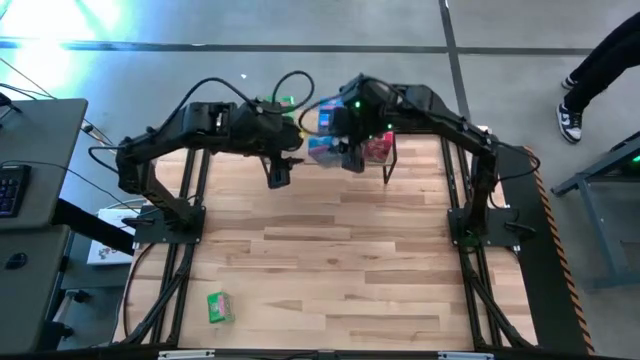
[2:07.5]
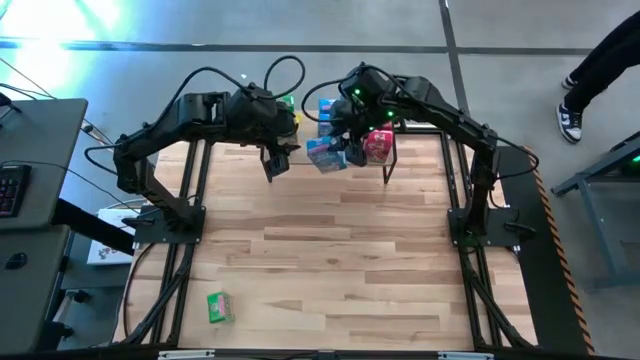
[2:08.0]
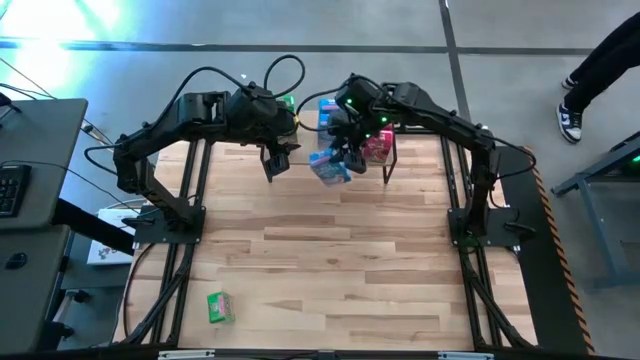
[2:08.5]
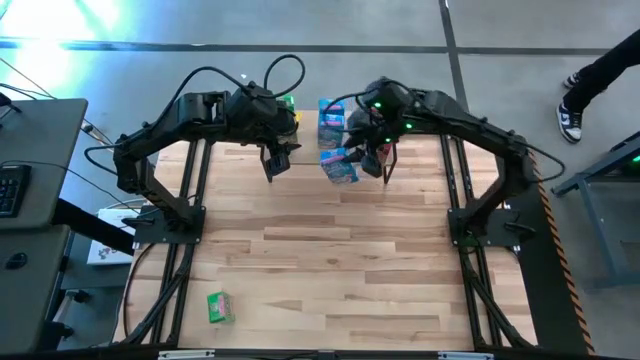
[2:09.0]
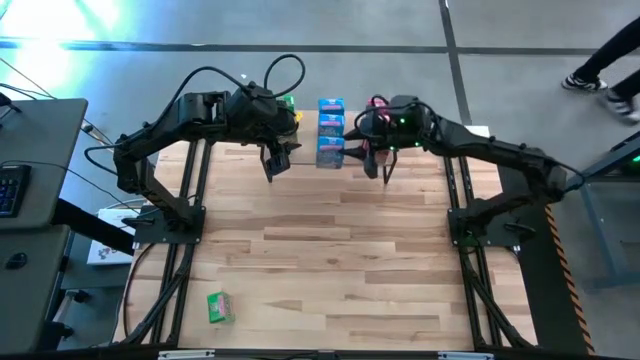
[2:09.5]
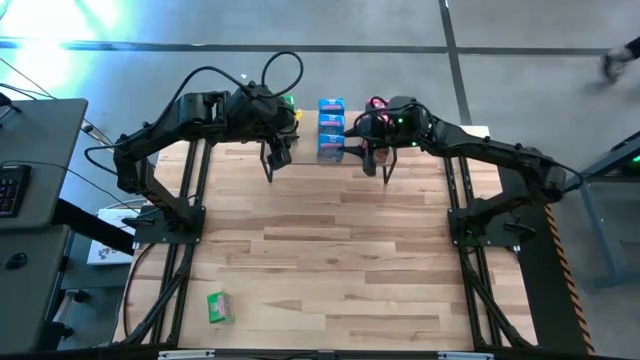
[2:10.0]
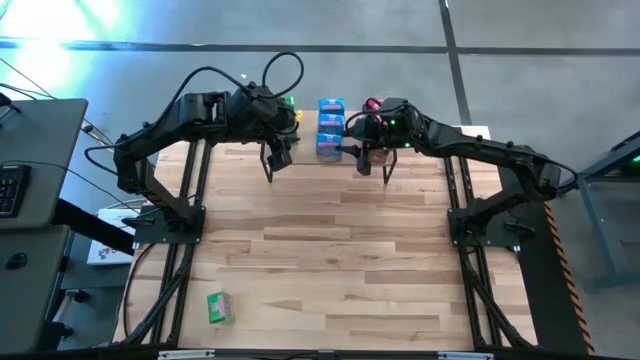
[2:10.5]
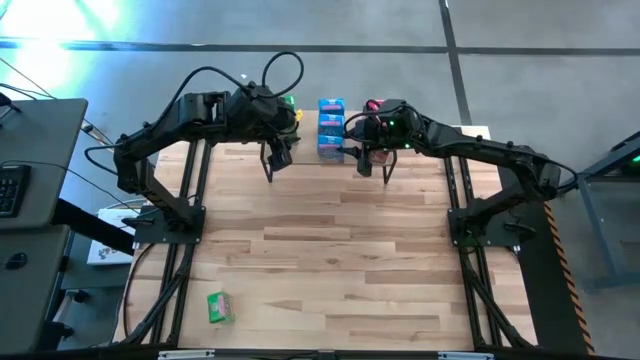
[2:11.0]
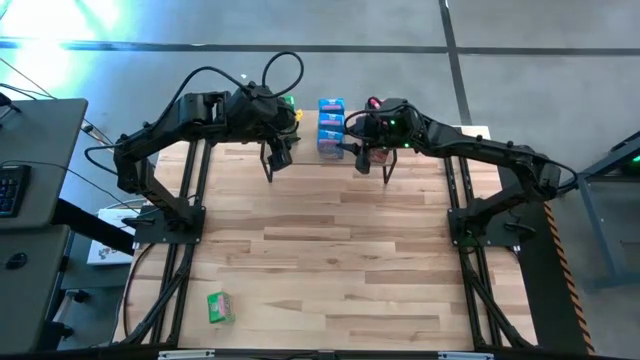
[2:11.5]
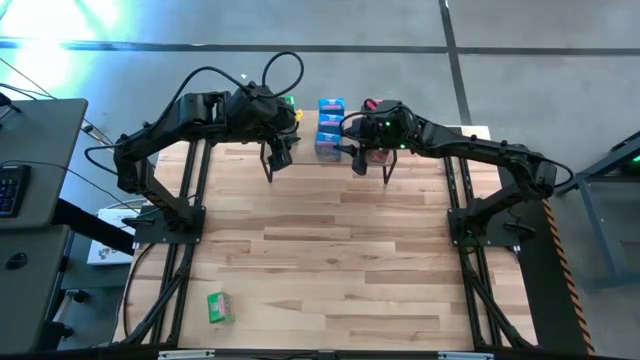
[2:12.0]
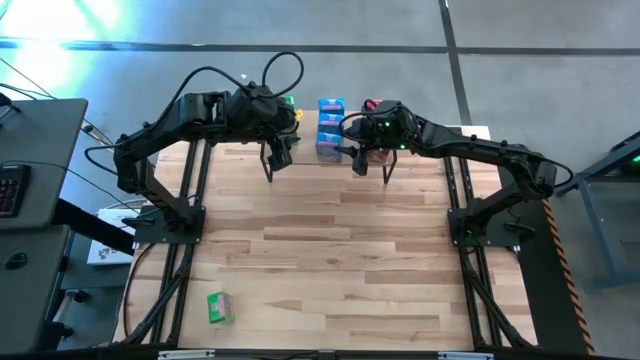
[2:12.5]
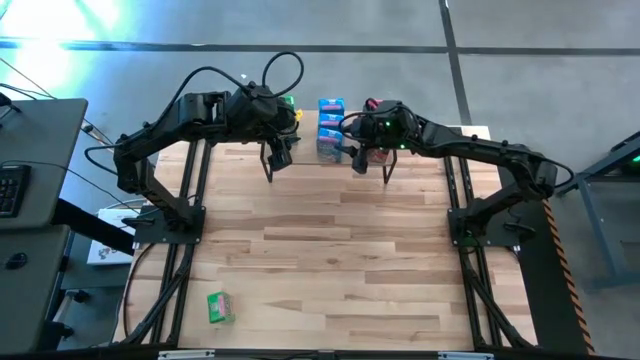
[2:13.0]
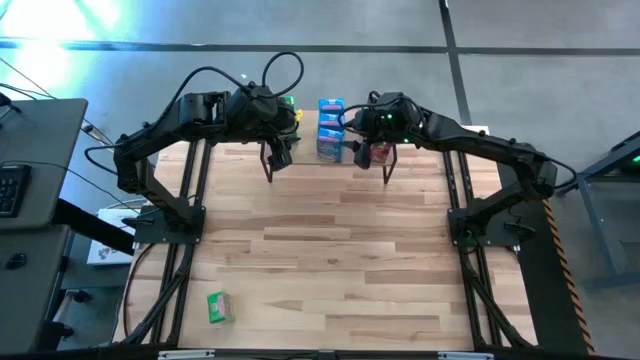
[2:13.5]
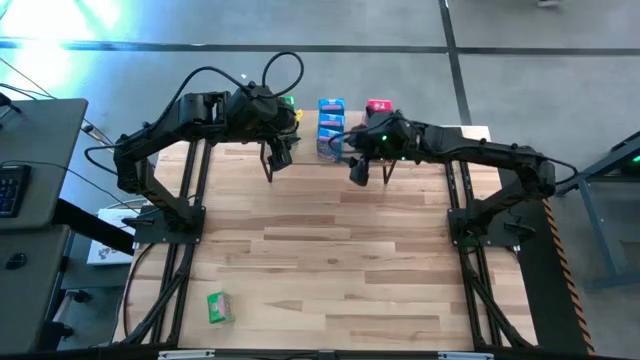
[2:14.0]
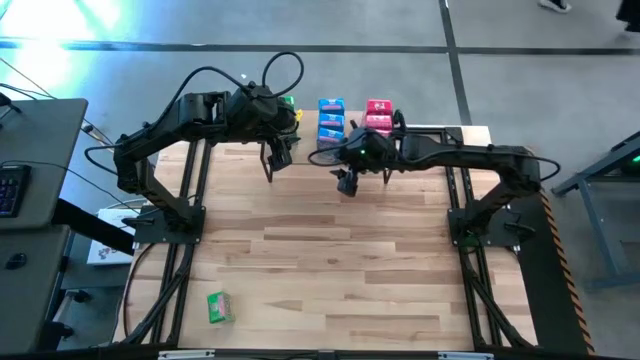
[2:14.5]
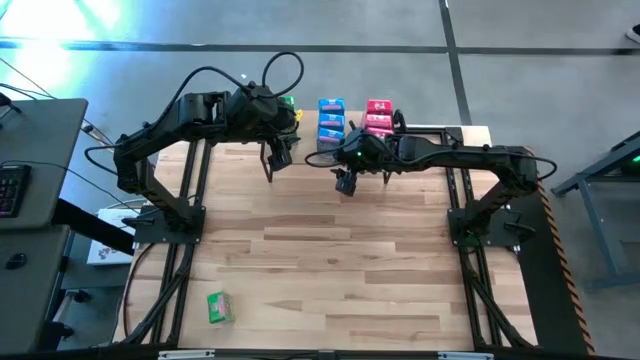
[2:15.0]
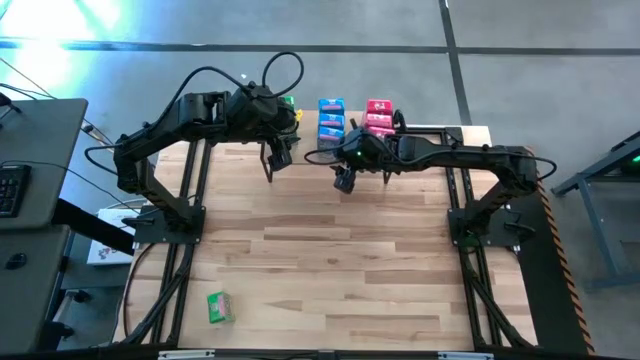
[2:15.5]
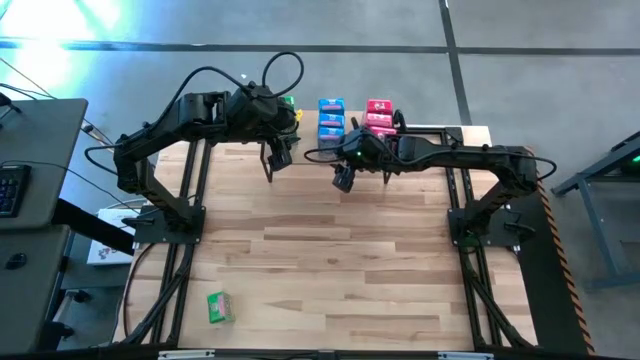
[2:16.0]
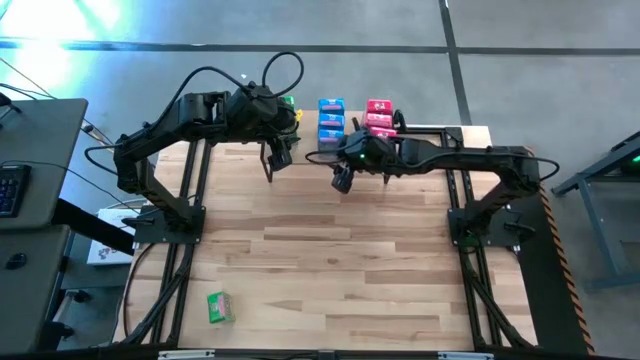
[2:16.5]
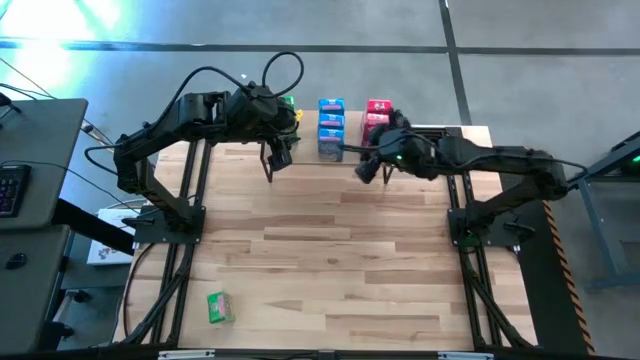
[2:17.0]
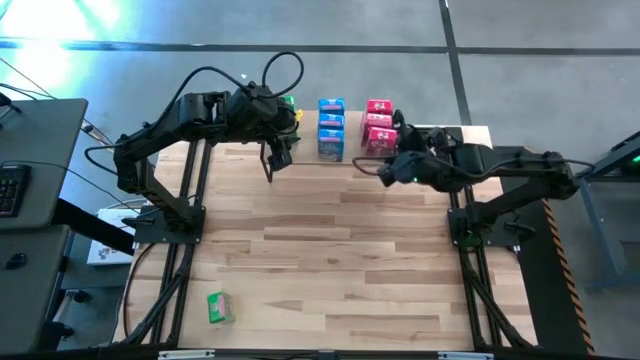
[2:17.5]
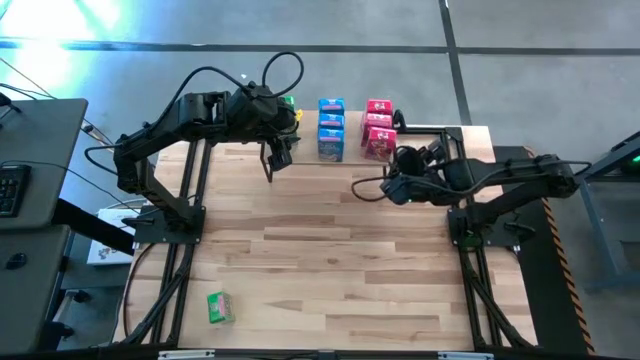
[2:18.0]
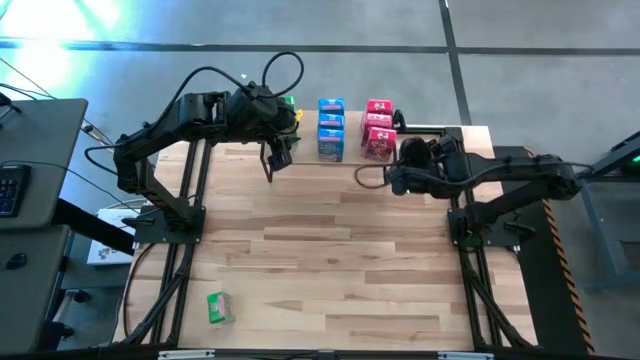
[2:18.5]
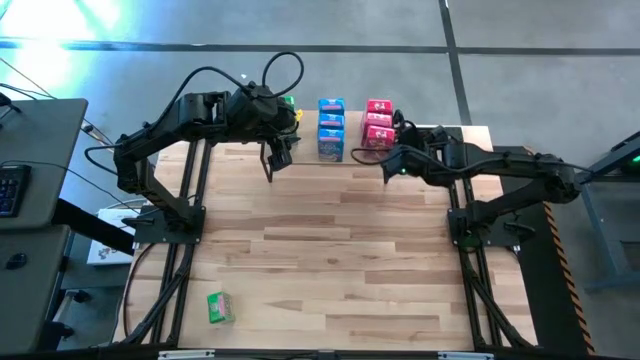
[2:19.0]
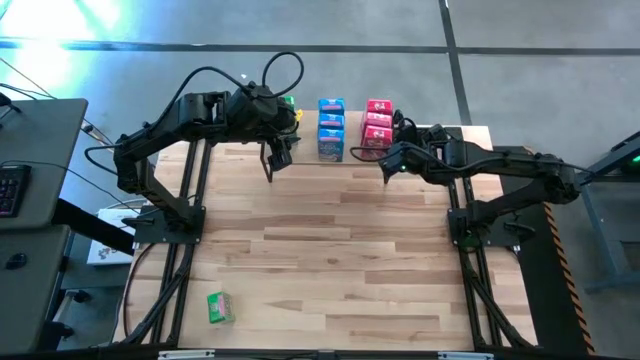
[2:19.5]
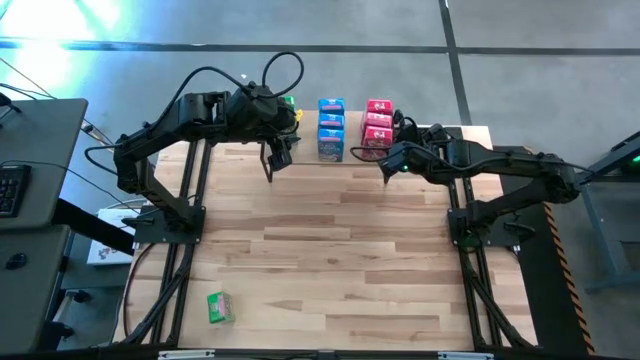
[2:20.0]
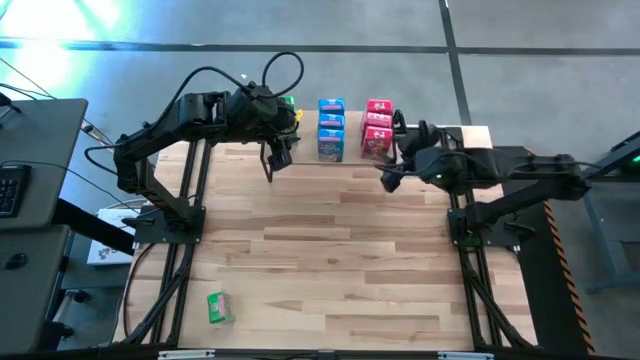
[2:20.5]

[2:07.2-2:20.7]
Task: Stack cereal on shelf
Put the blue cereal box on the shelf

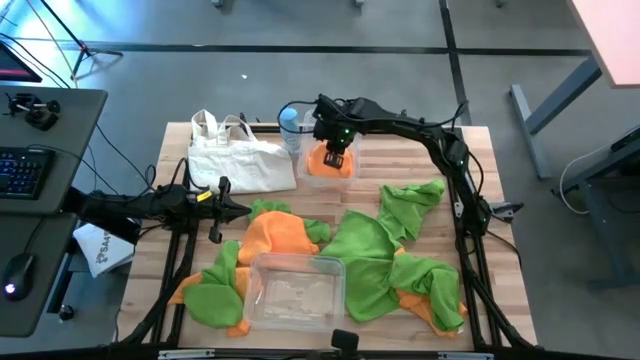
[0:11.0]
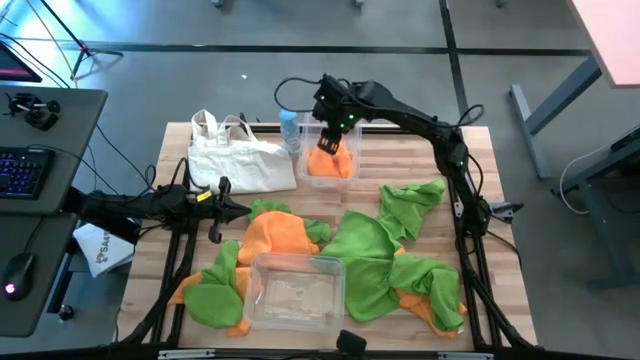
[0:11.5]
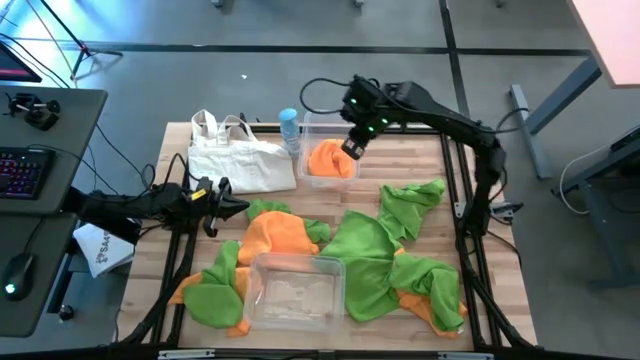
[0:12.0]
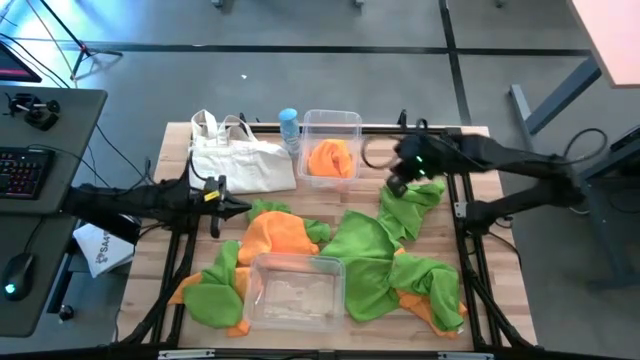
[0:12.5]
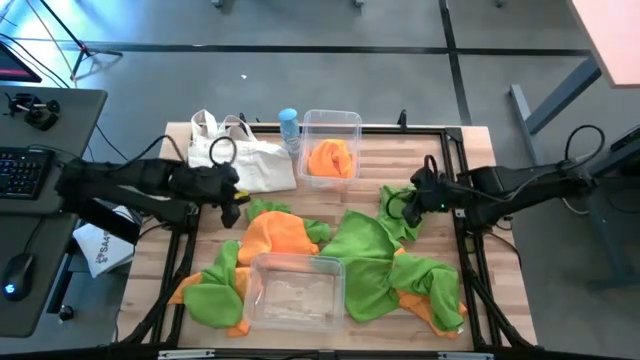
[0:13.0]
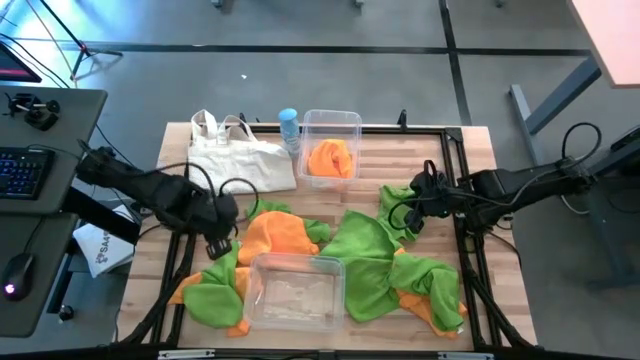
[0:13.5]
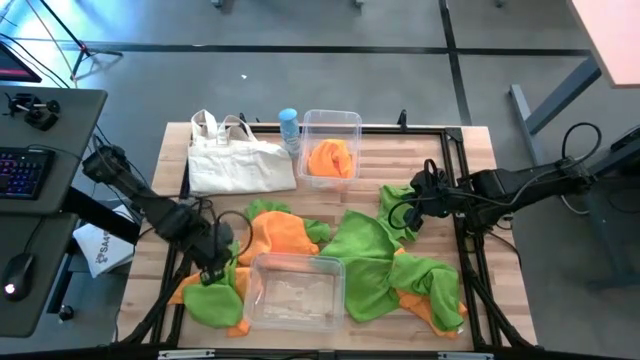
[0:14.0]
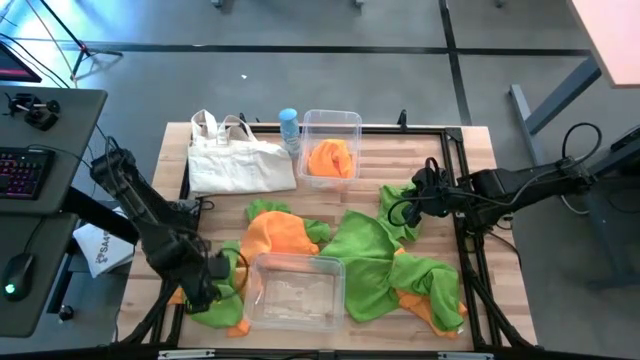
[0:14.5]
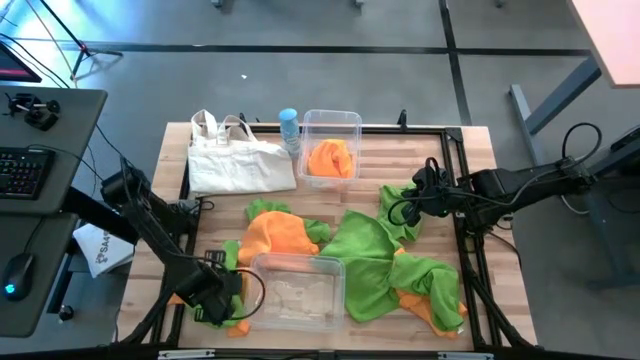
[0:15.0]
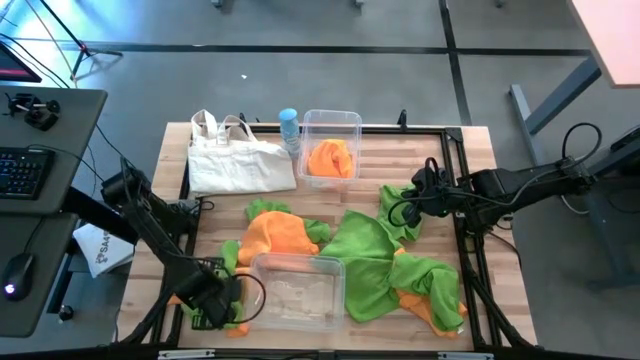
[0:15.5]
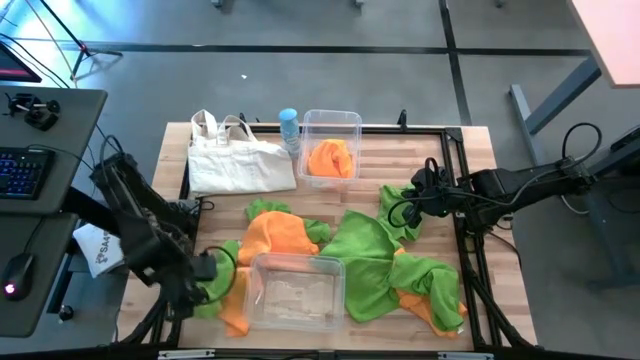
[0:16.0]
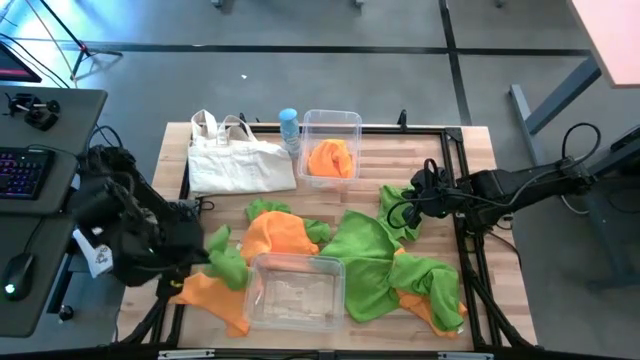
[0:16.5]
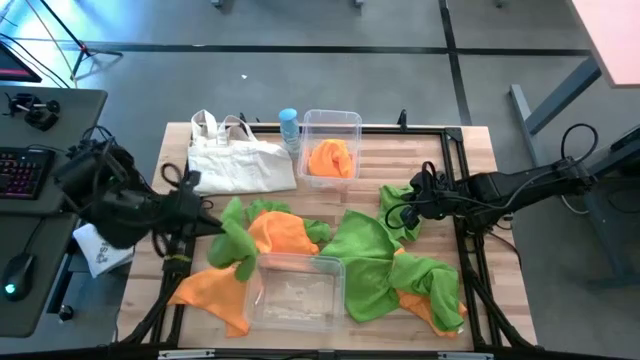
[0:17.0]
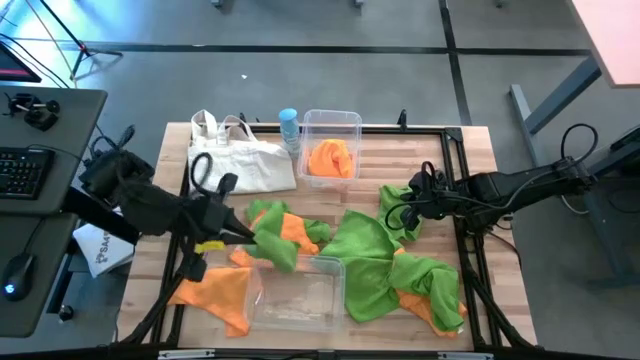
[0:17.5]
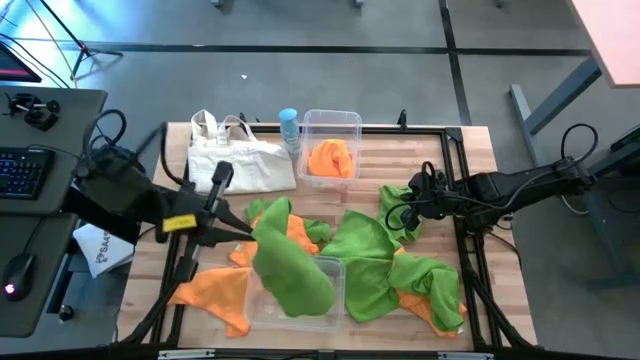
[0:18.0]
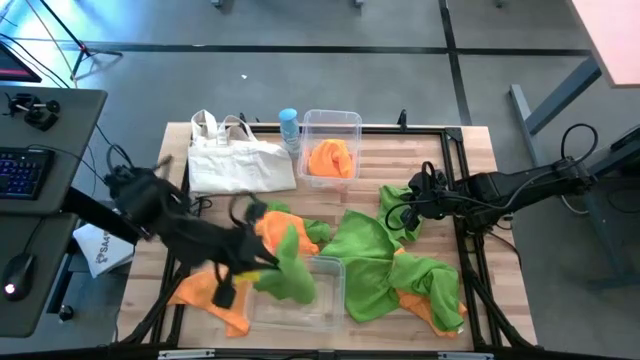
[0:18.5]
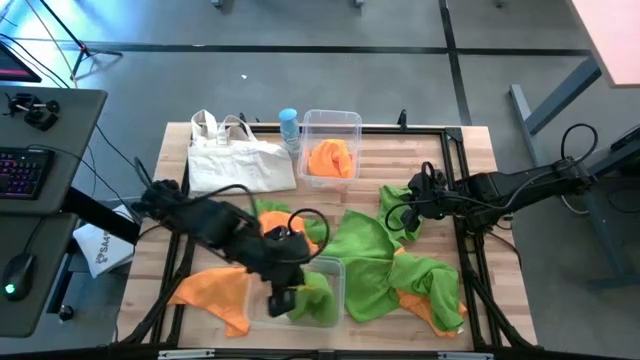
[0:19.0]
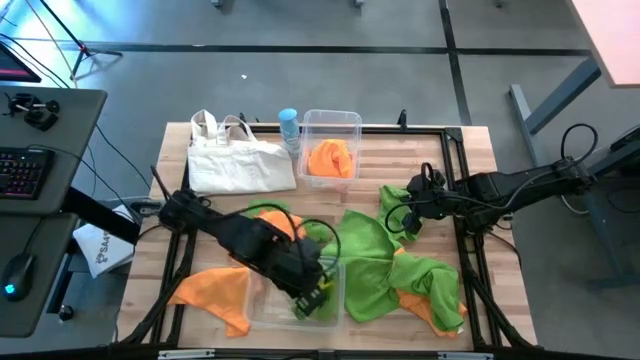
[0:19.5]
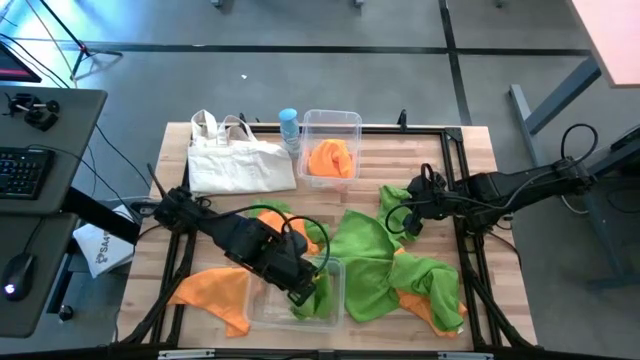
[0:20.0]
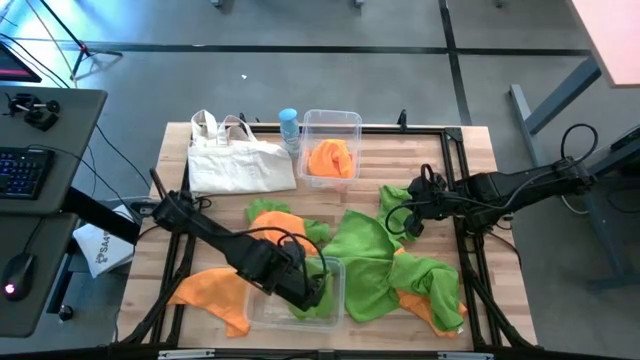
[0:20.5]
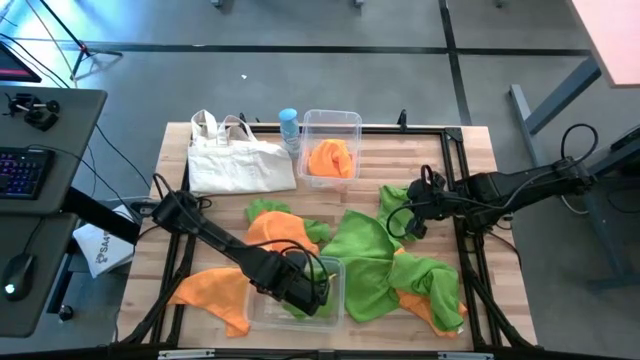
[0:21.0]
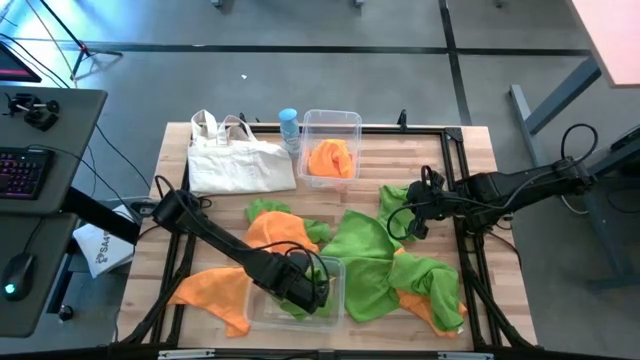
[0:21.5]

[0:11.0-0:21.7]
Task: Sort microfiber towel by color & place in baskets
Put the green microfiber cloth into the bottom transparent bin
